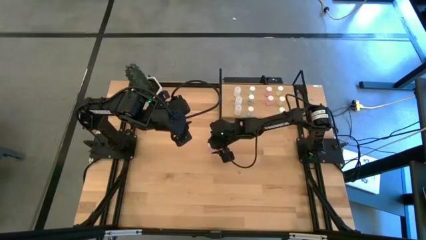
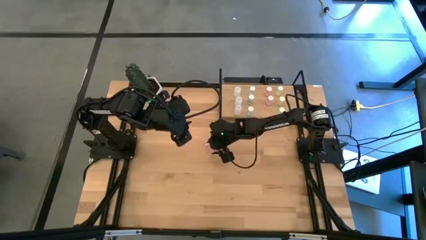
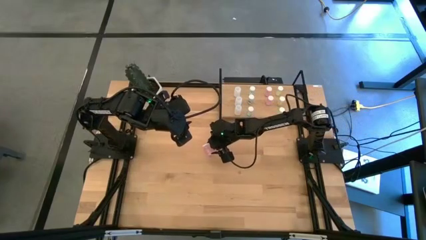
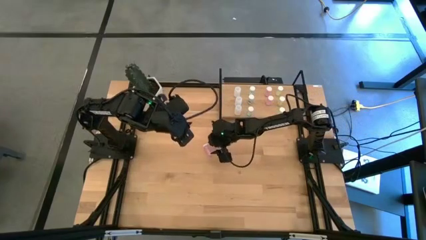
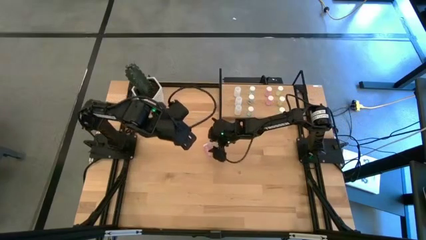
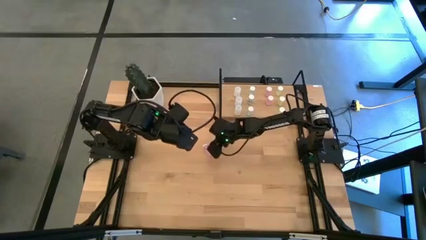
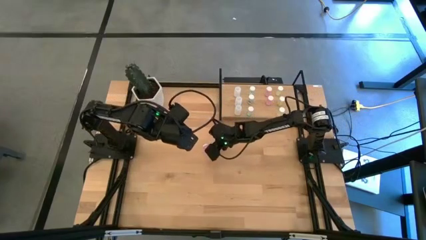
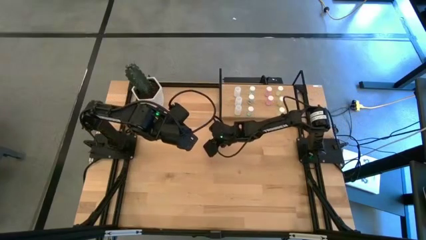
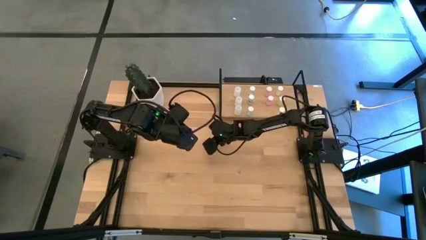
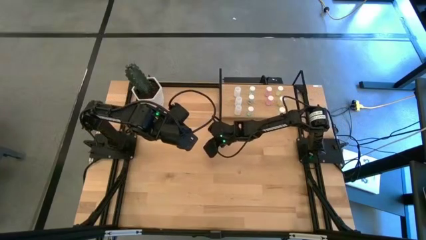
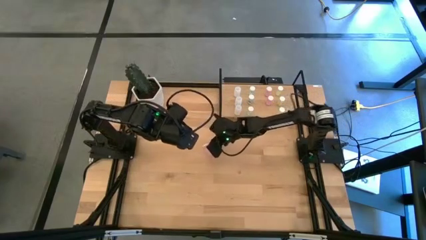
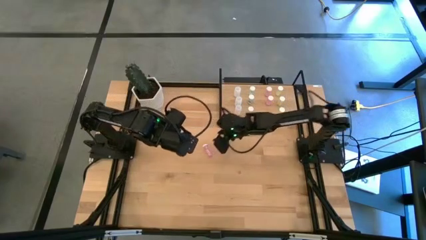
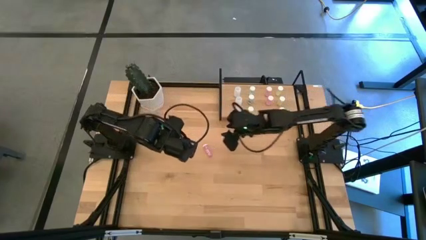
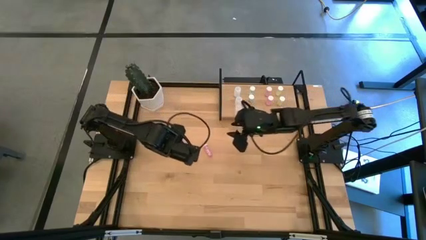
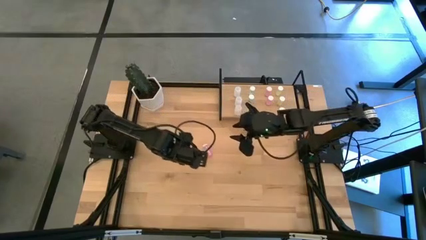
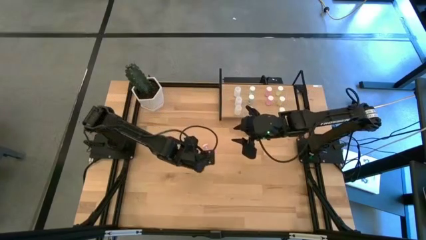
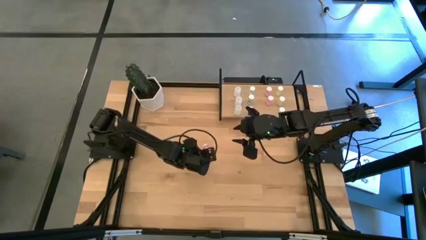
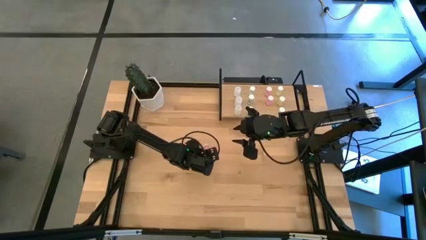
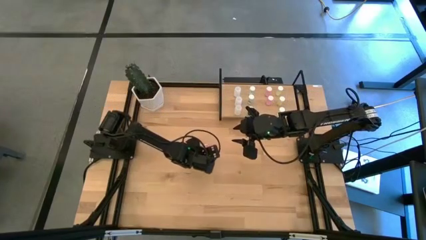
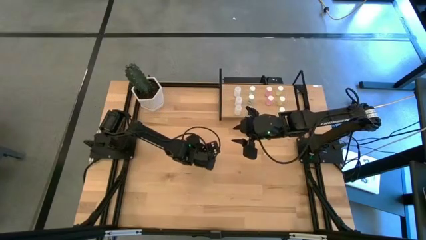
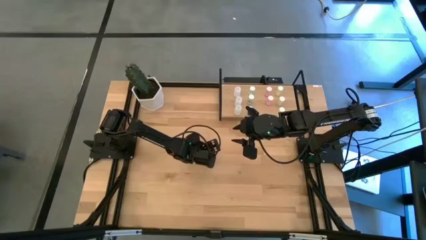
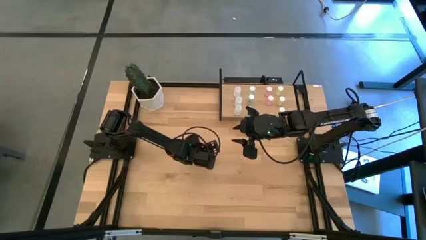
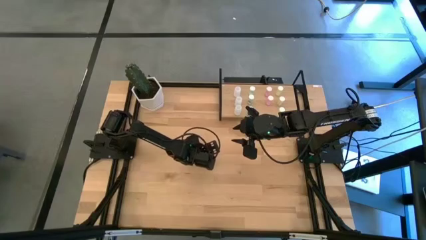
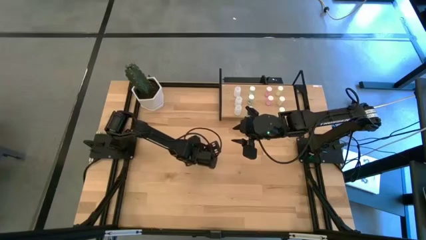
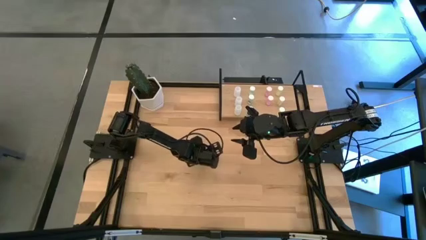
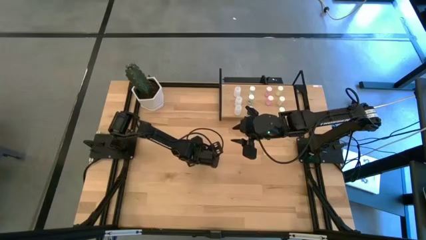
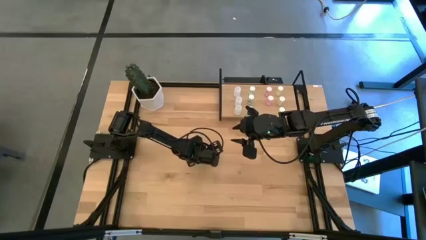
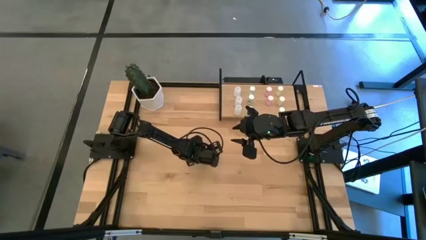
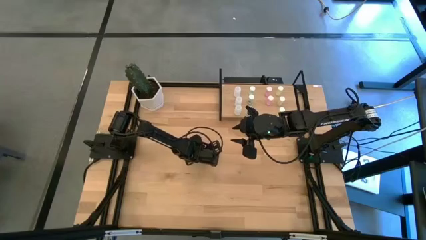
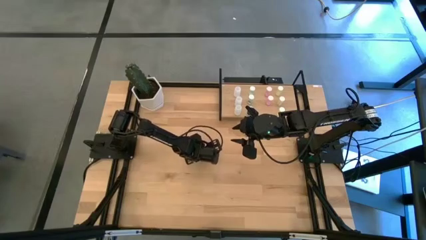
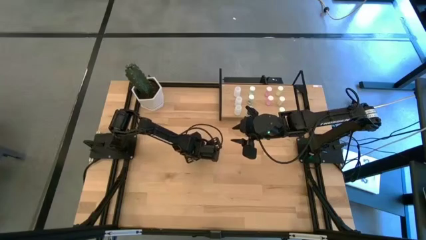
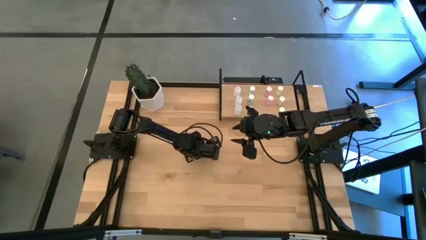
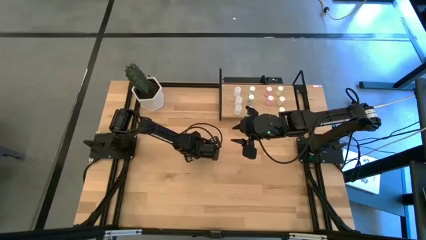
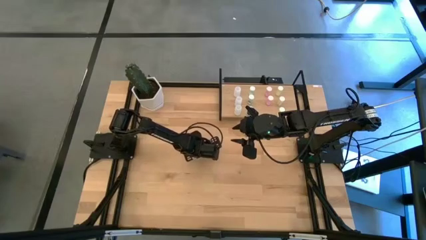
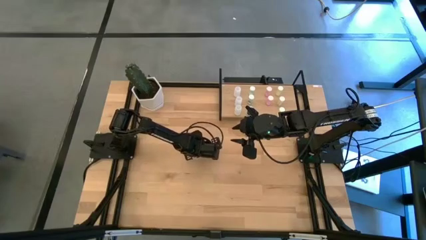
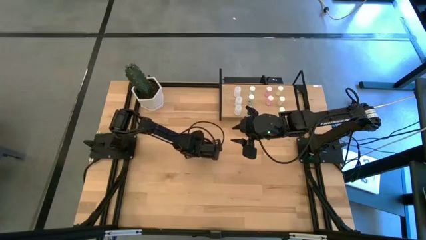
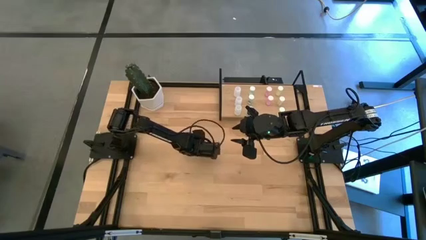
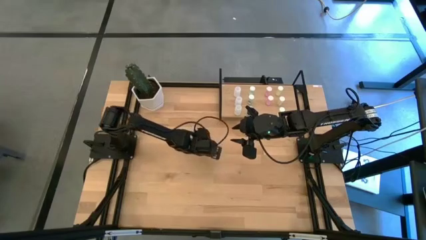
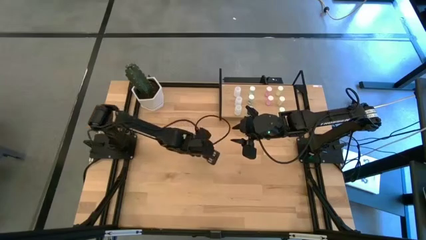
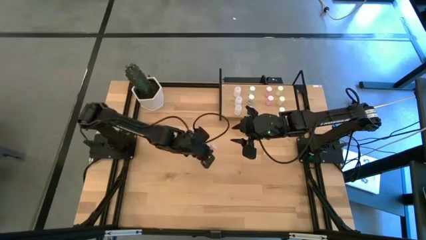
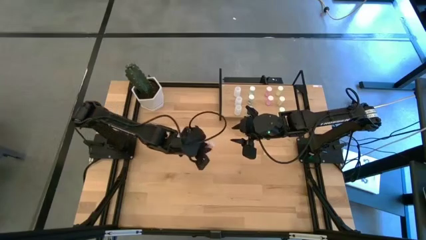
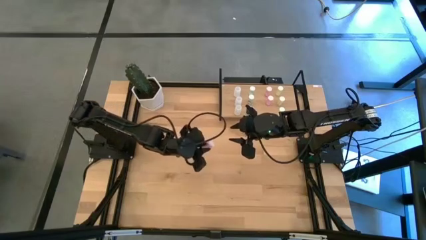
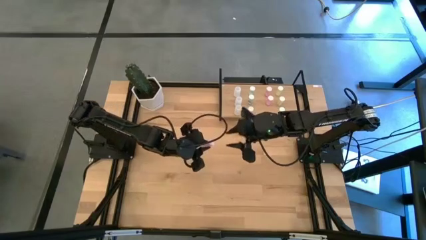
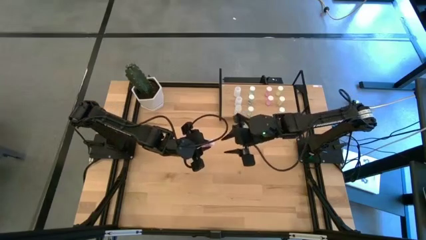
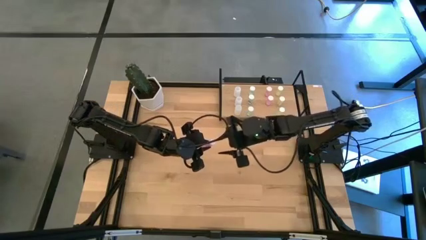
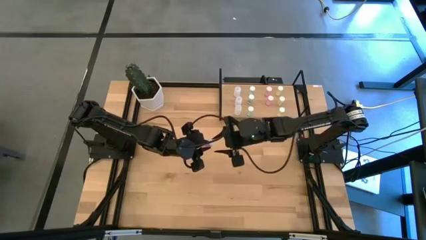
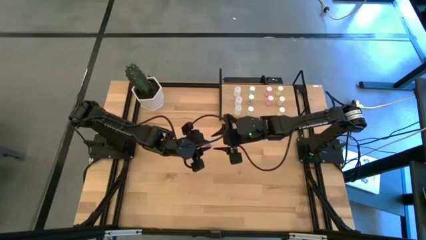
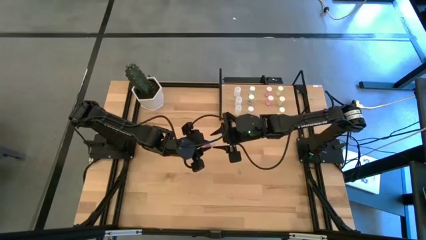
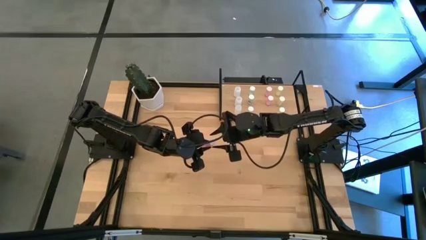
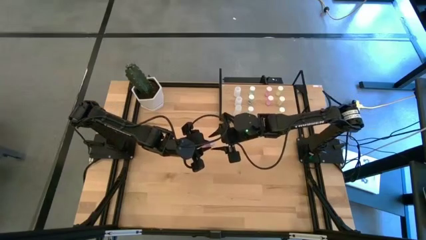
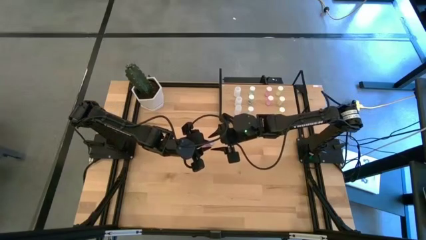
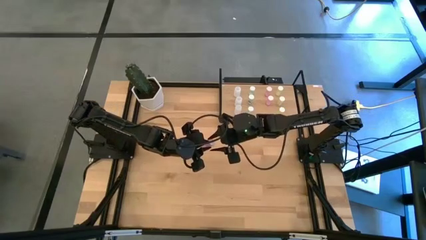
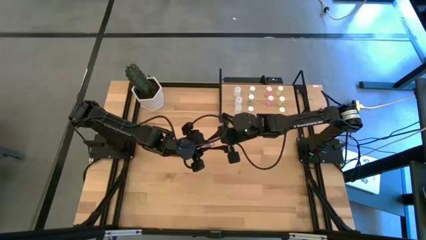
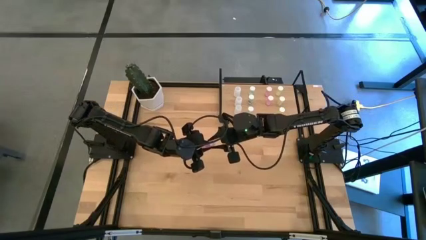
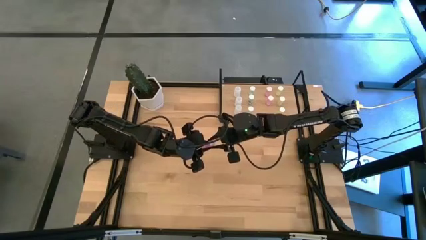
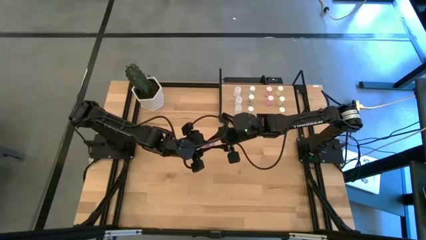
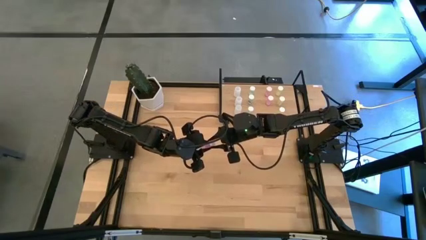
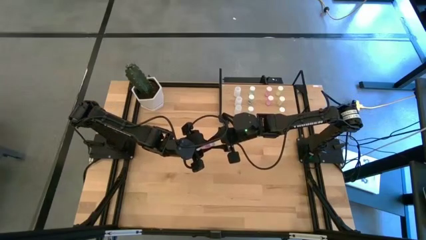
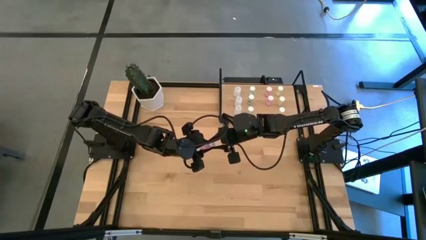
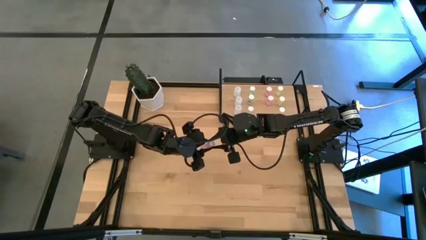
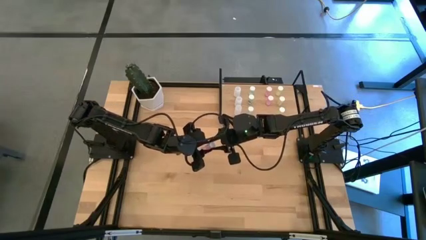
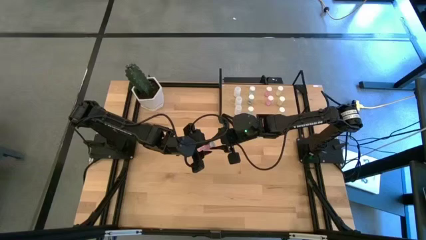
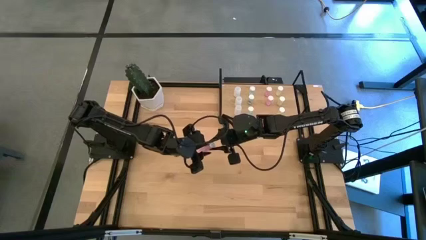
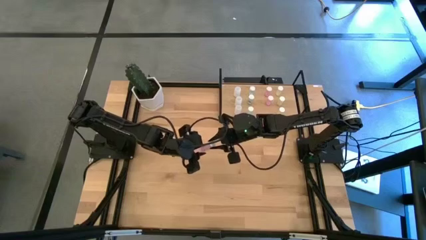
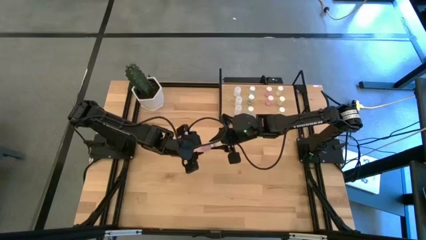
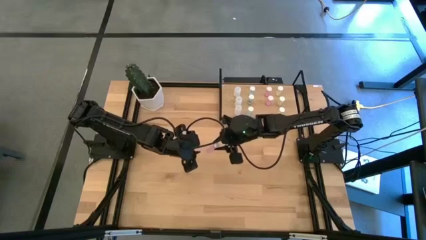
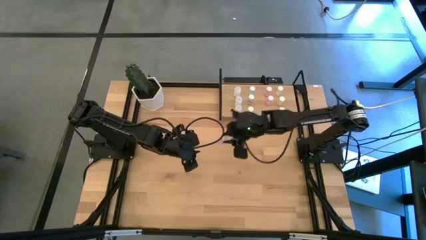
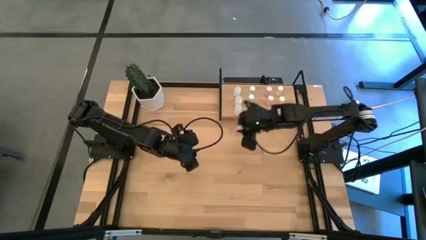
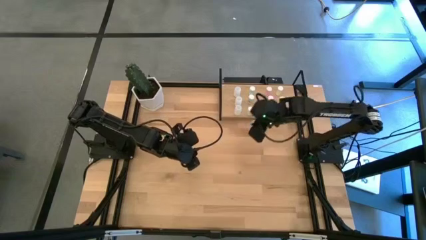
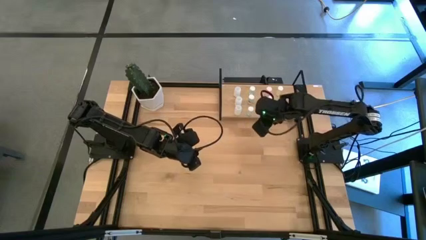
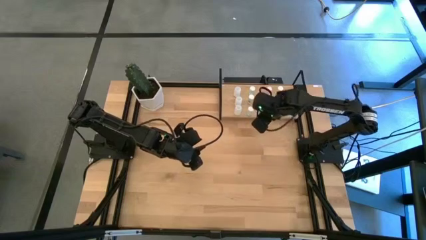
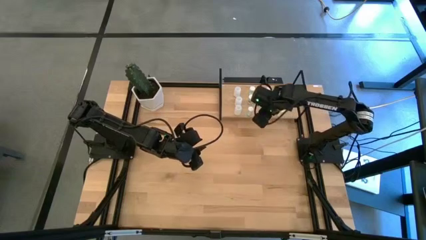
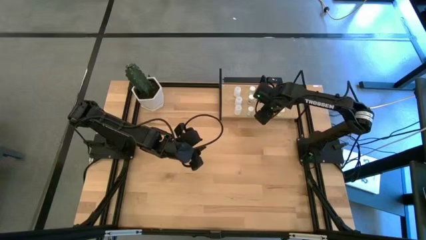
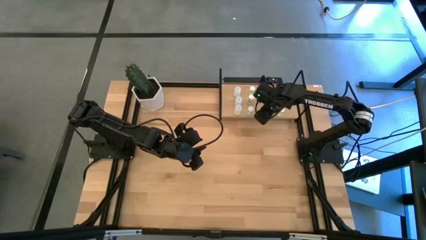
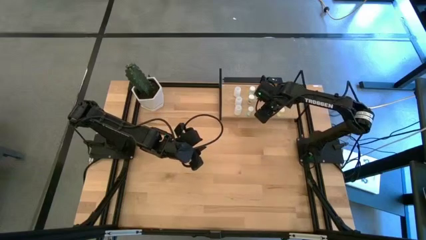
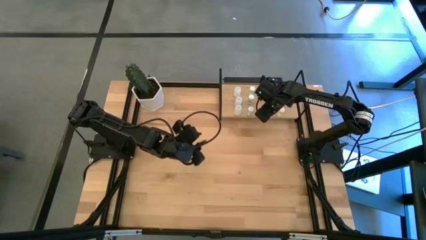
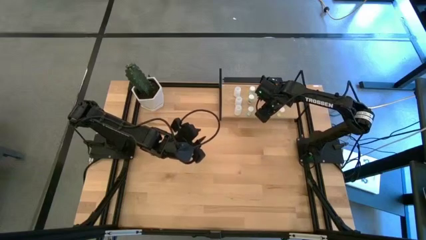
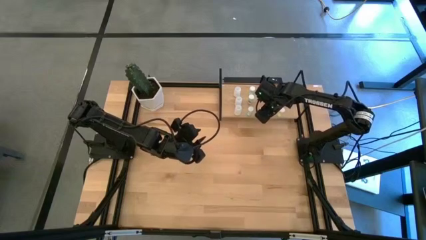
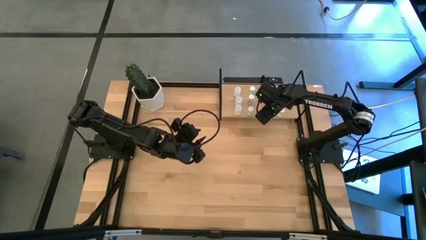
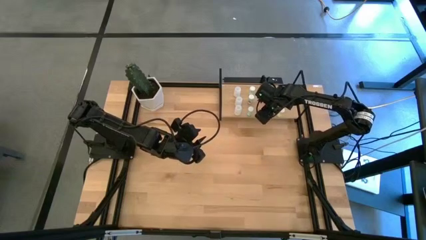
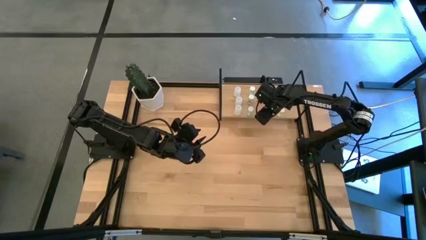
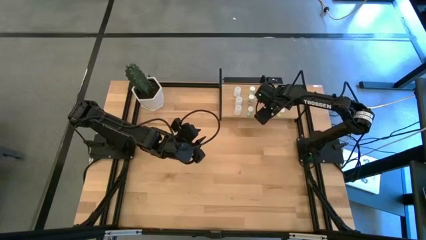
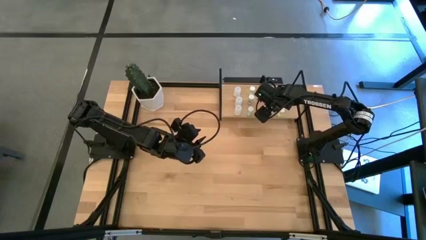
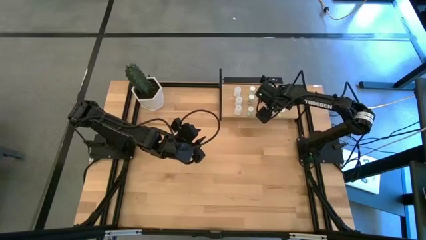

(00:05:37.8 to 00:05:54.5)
Task: Pick and place medicine bottles onto shelf by color
Put the pink pill bottle on the shelf aligned with the other pink pill bottles
